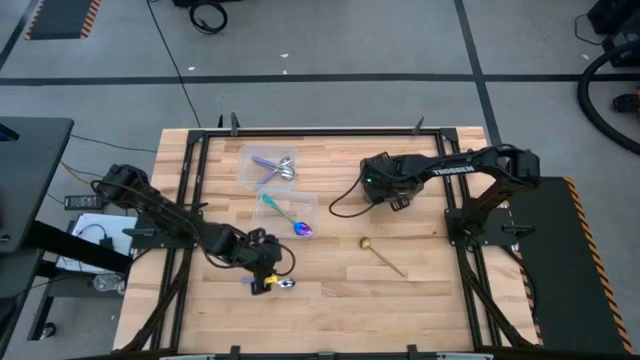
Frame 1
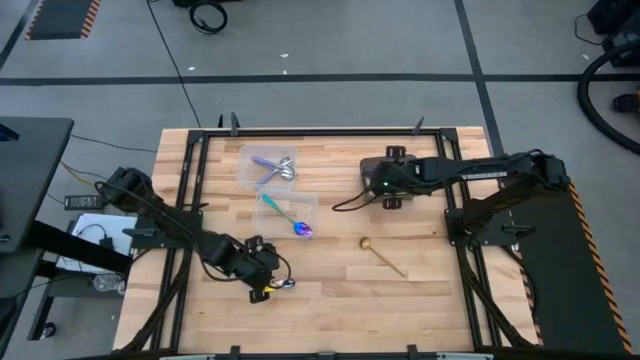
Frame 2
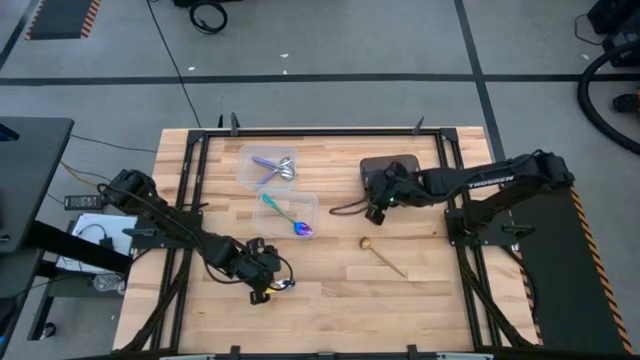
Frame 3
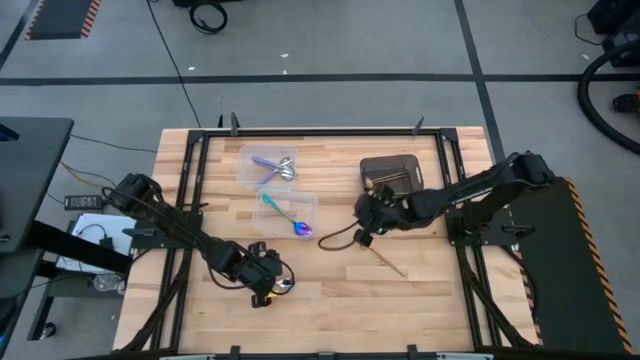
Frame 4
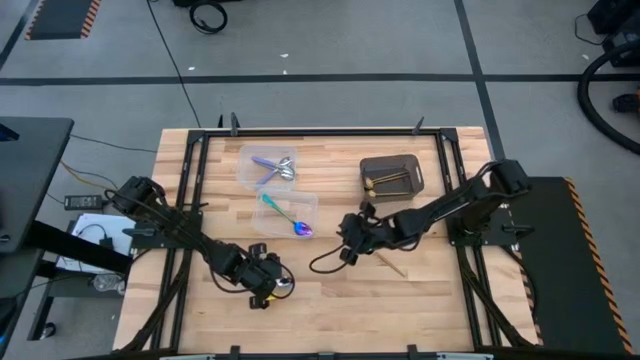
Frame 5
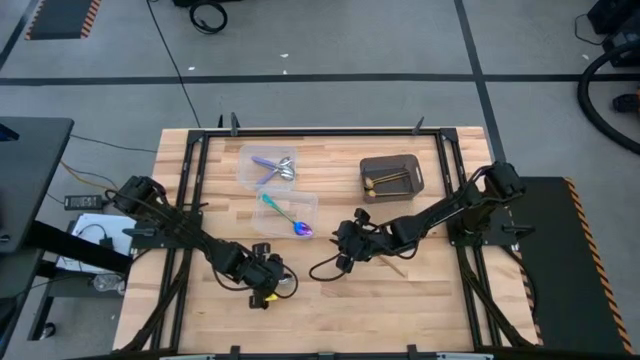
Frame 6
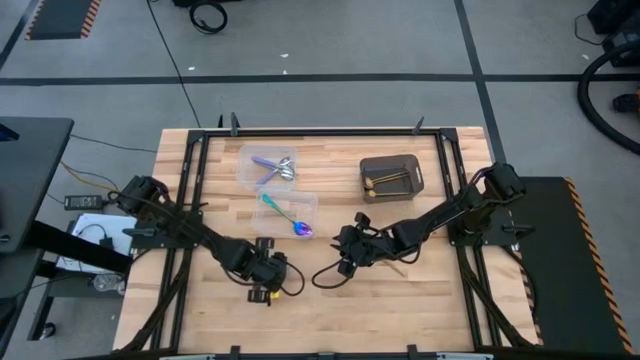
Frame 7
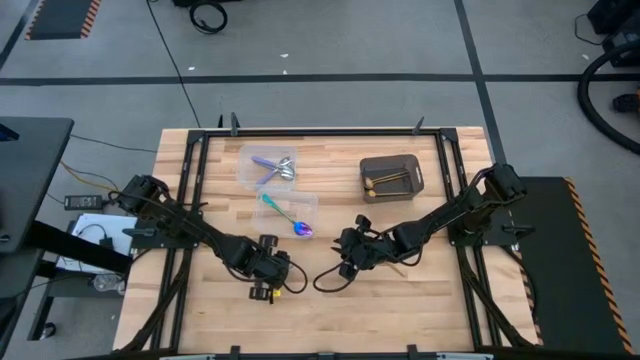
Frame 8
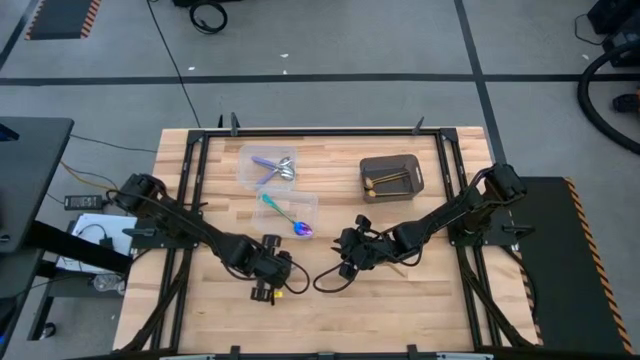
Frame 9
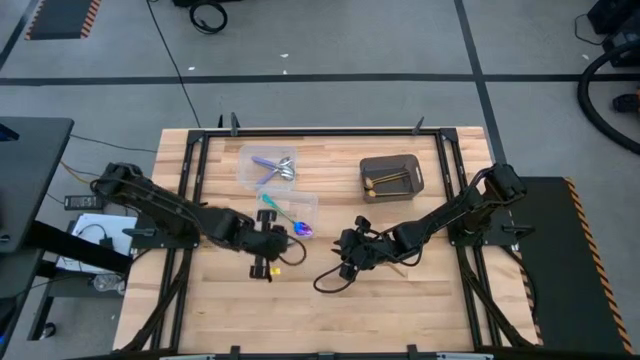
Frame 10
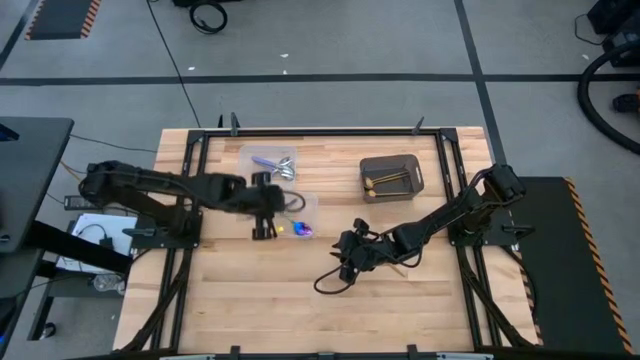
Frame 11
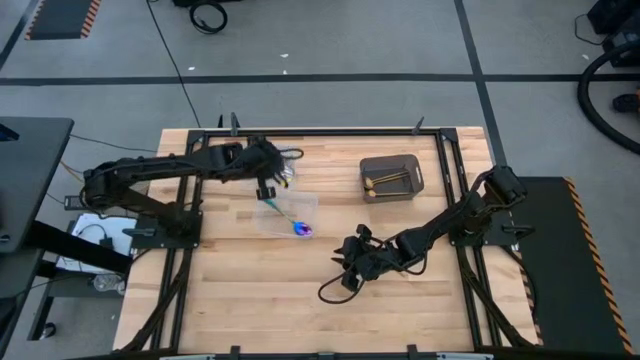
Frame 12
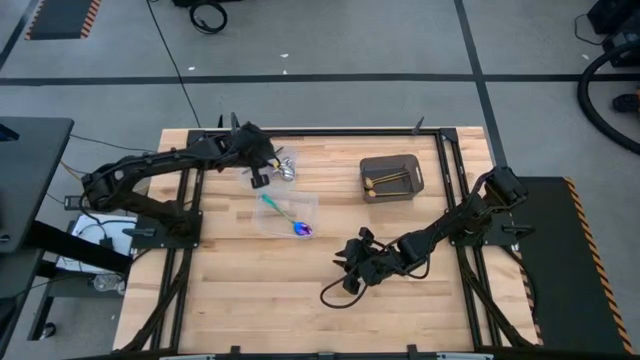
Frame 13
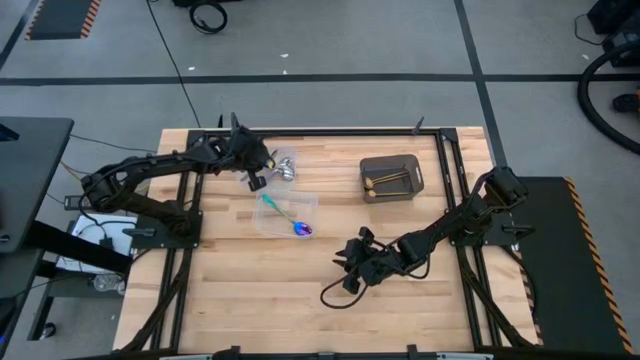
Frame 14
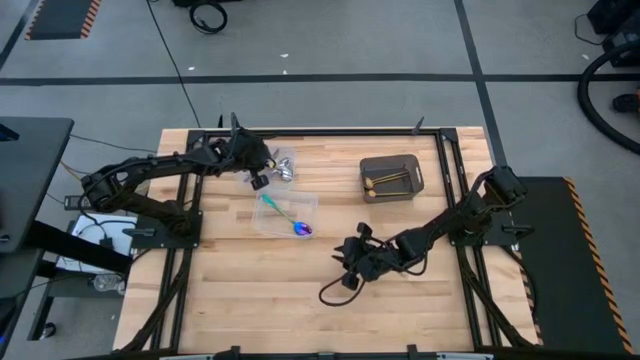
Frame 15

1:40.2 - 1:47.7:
Task: Sort silverware by color (type)
Put the purple spoon into the top transparent bin

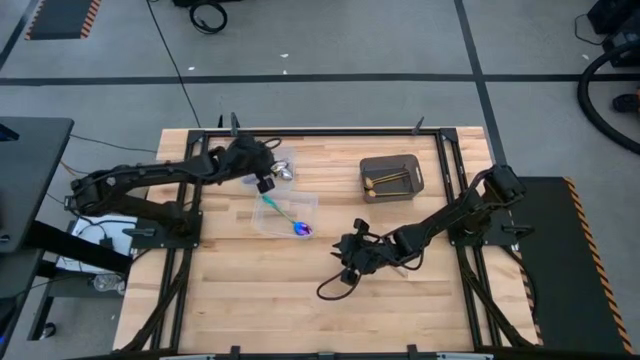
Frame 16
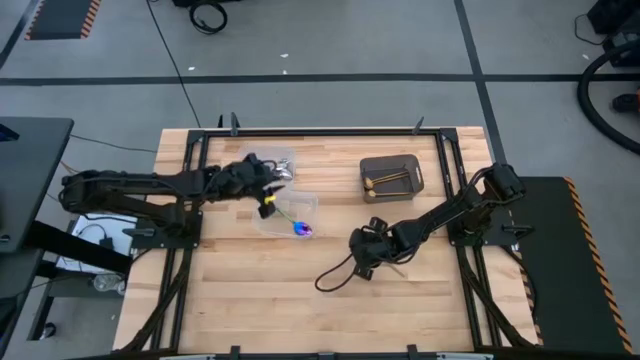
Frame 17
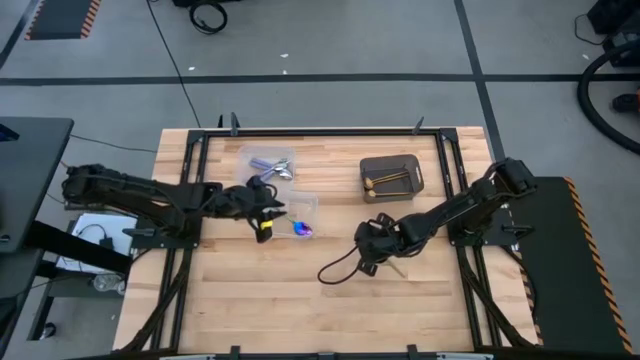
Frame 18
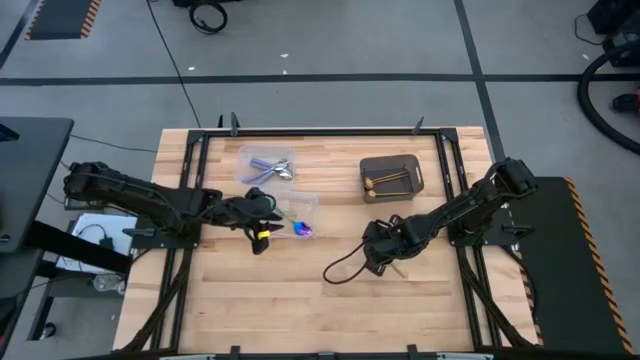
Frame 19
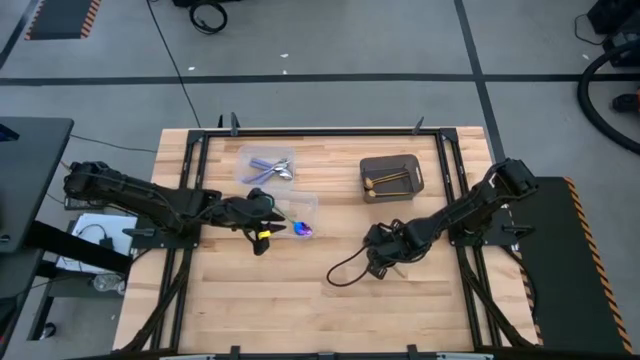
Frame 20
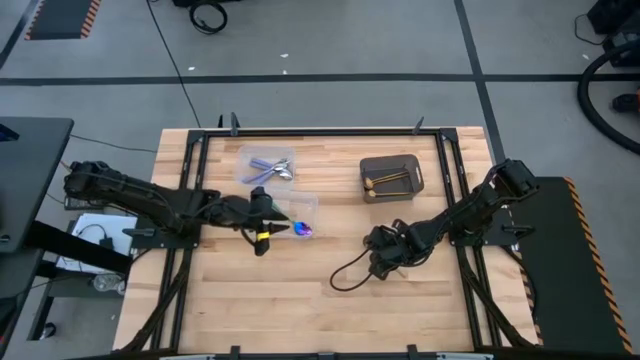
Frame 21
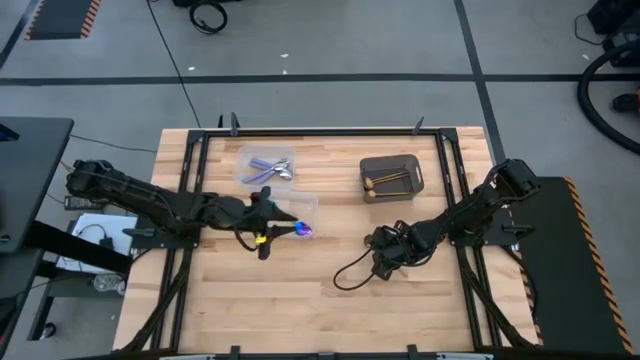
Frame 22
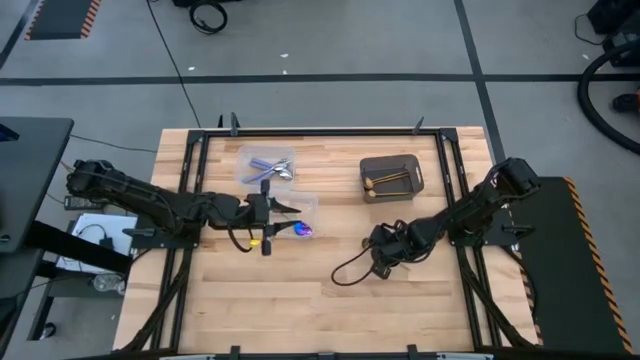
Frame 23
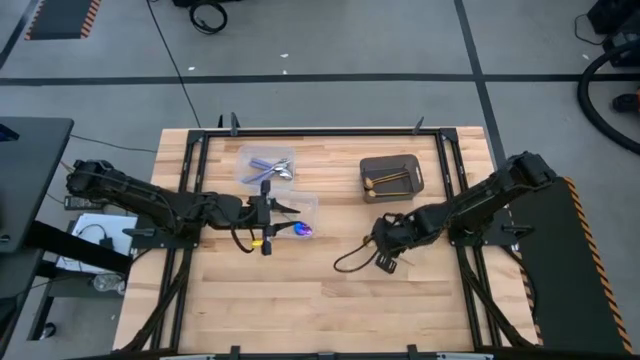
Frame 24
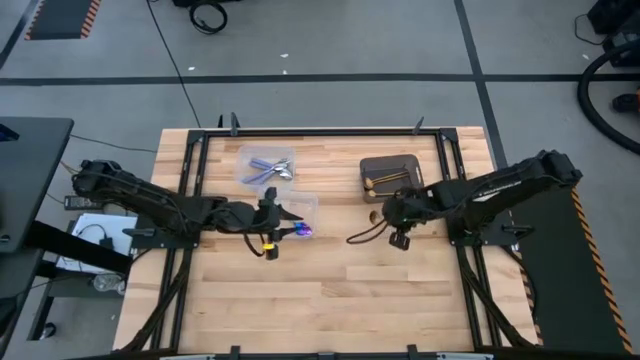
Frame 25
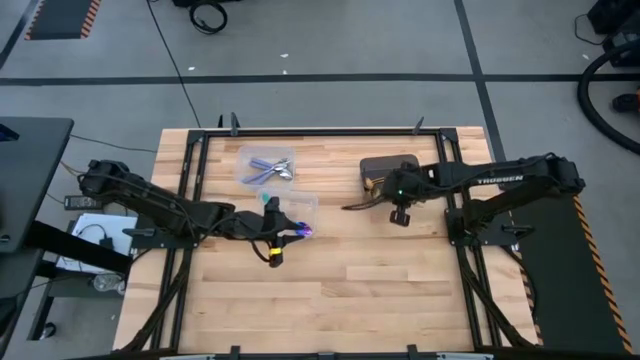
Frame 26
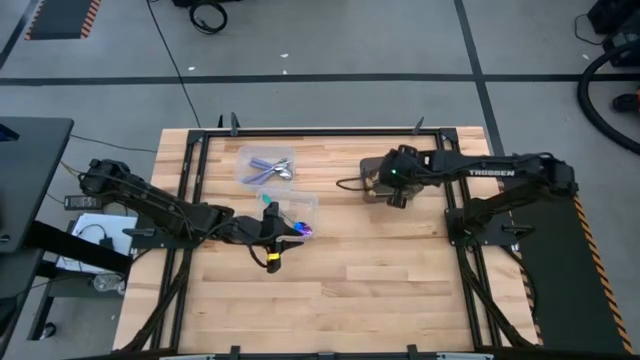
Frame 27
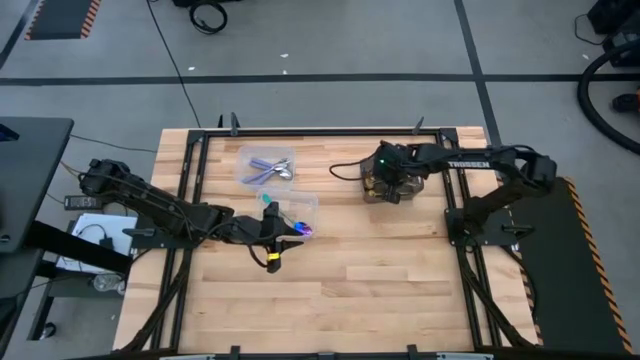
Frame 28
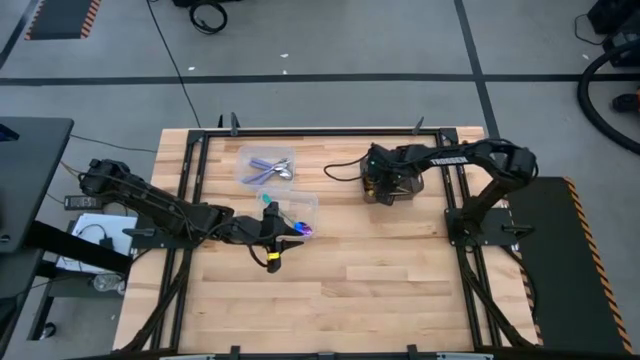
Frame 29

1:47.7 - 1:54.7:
Put the gold spoon into the black bin

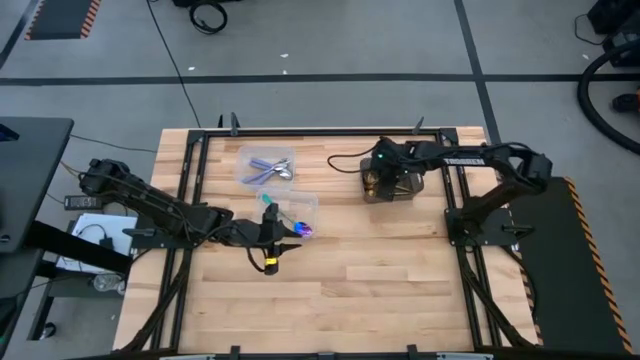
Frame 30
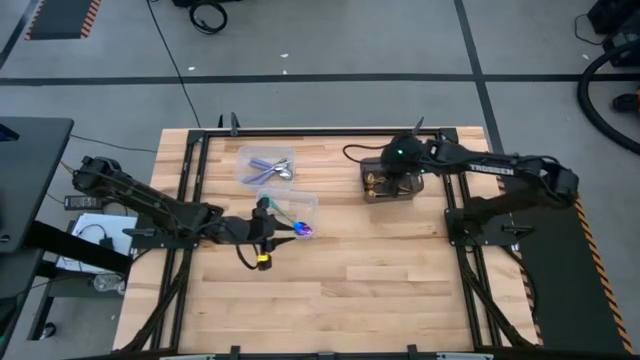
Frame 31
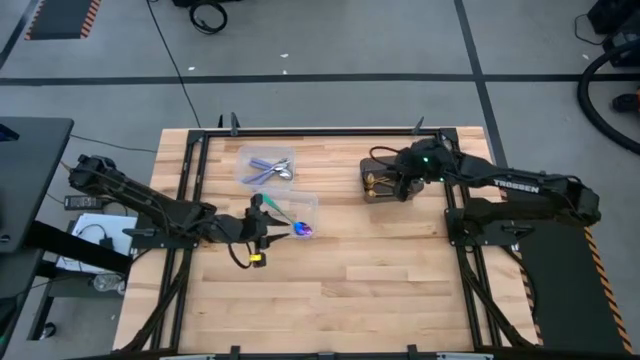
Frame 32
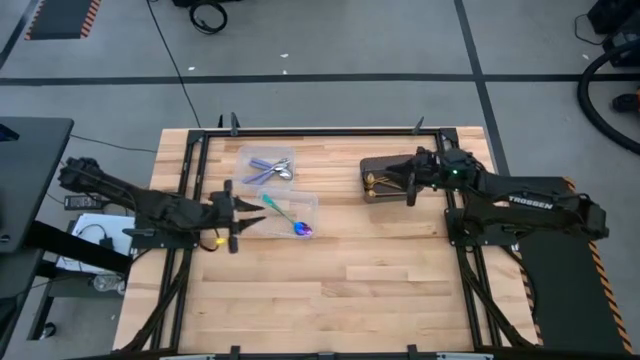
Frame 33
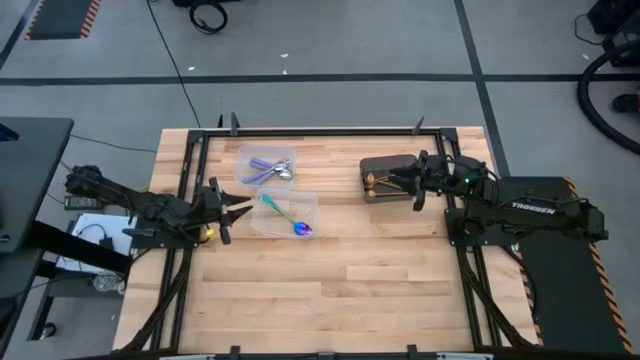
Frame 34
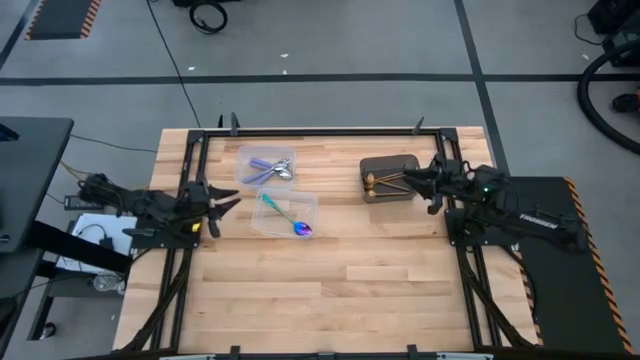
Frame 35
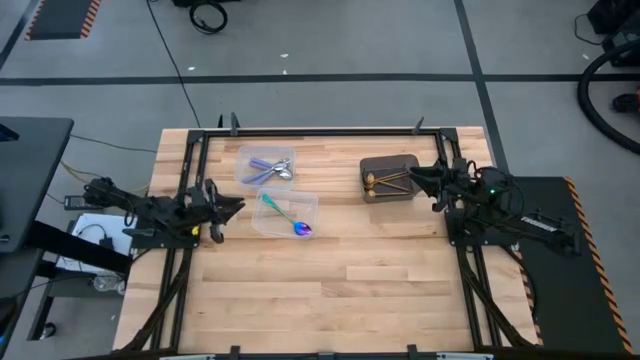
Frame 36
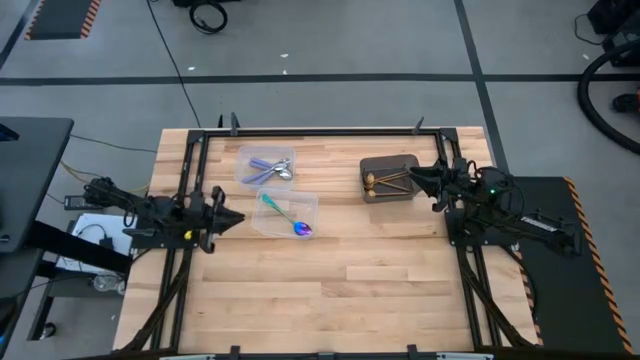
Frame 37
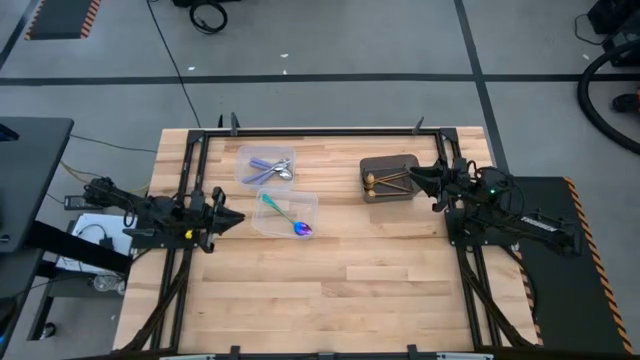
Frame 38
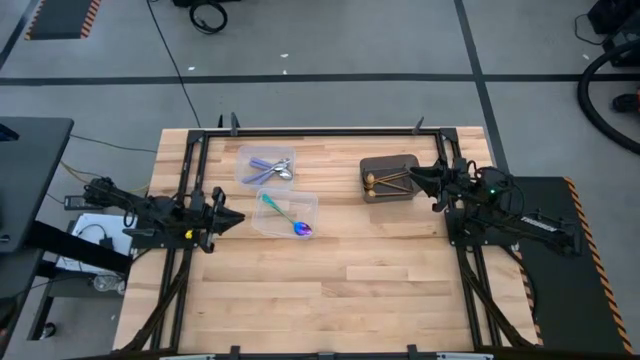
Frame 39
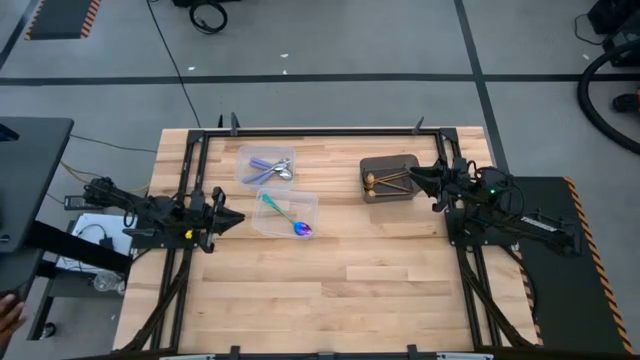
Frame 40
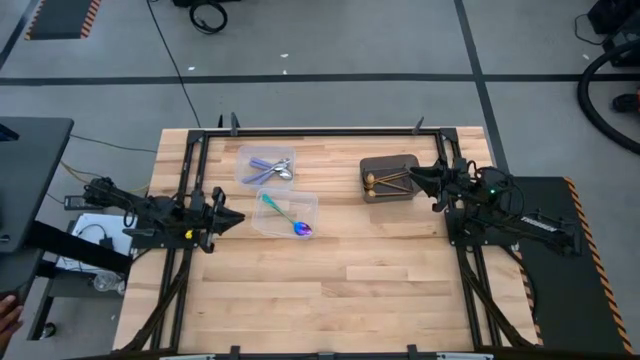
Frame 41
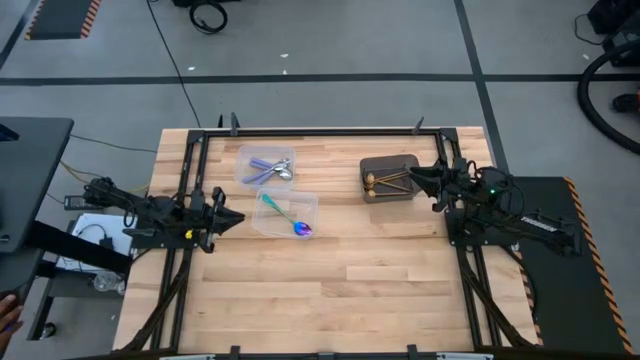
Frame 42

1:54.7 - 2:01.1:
Return to Home Position
